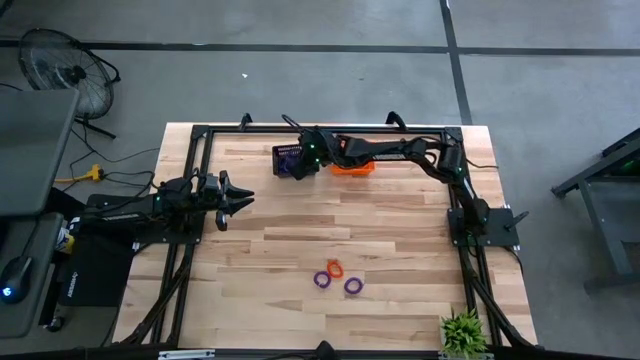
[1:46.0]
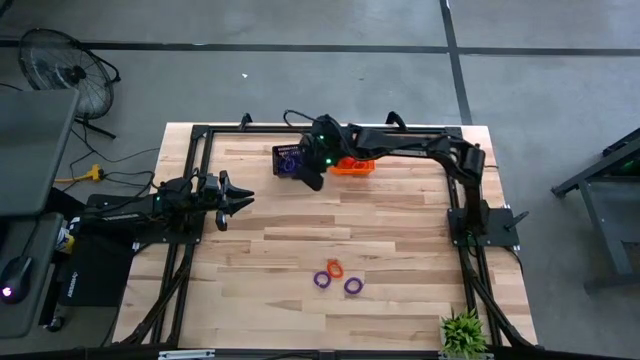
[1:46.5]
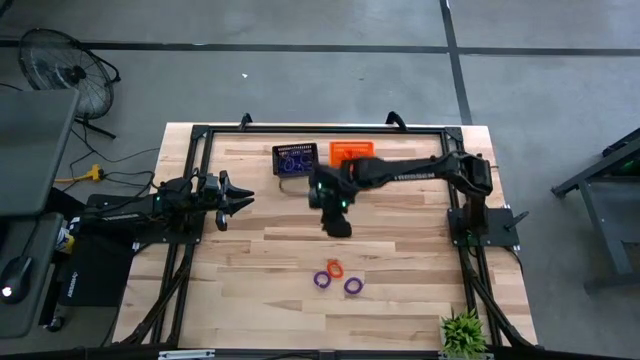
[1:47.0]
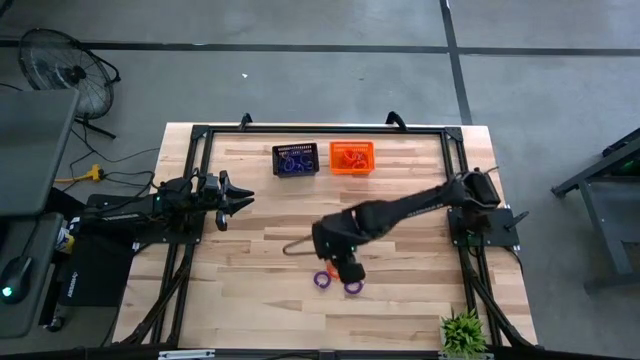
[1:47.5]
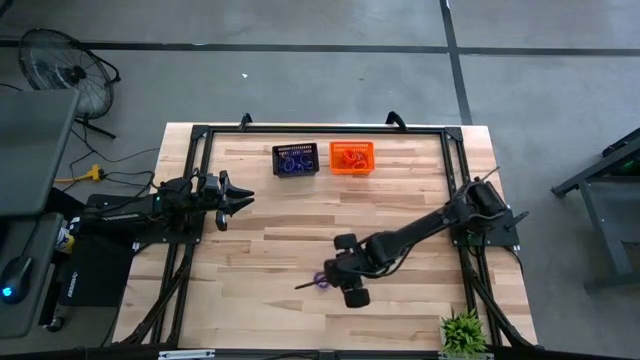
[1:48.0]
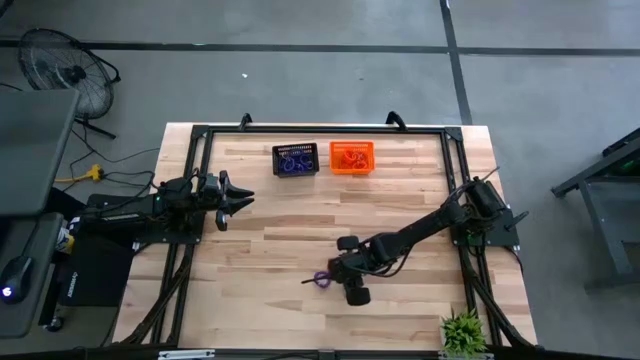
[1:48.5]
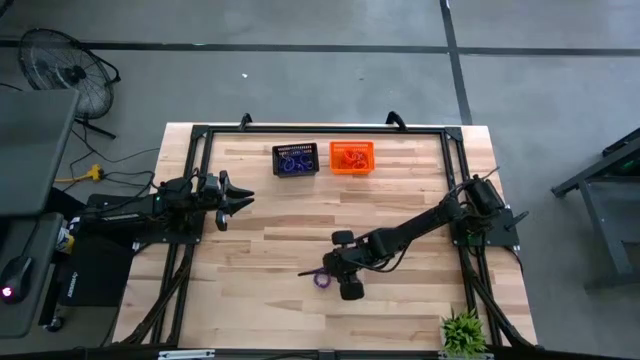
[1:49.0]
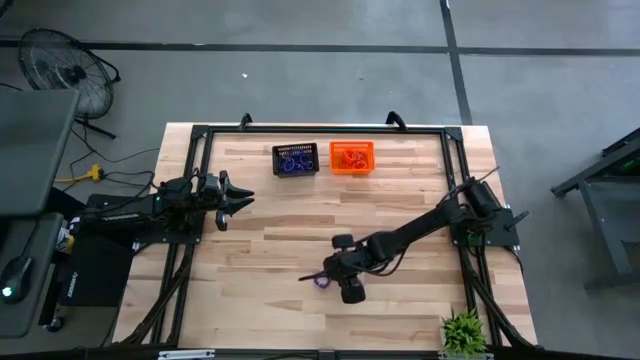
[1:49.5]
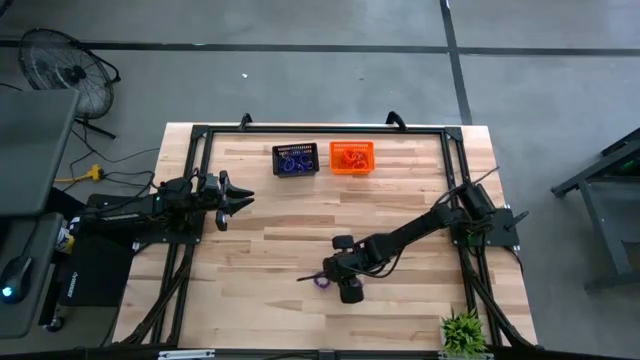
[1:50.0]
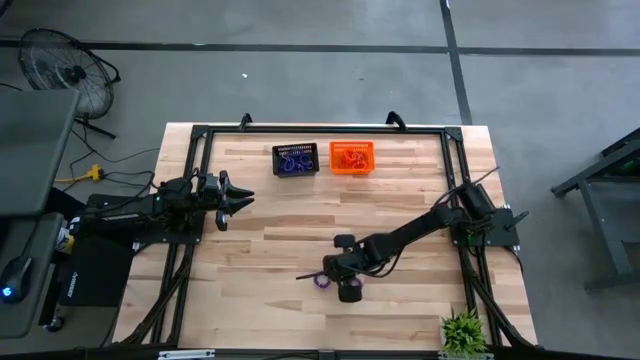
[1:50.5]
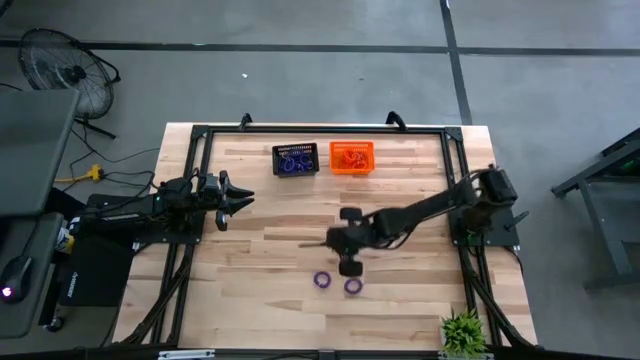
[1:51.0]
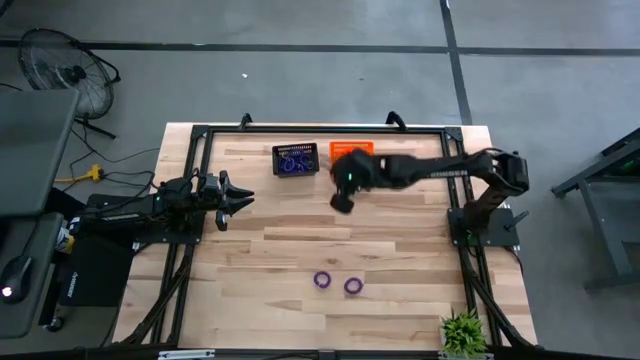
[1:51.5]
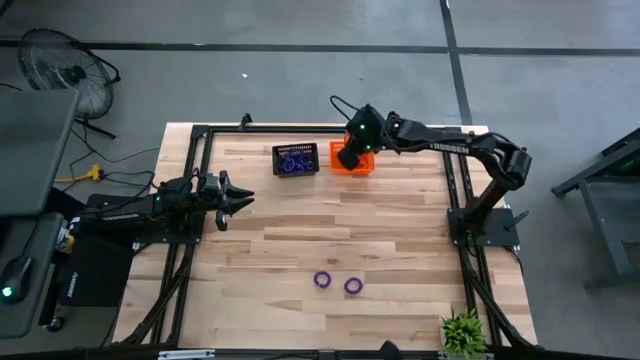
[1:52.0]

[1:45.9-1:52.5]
Task: Sort spring keychains
Put the orange spring keychain into the orange bin

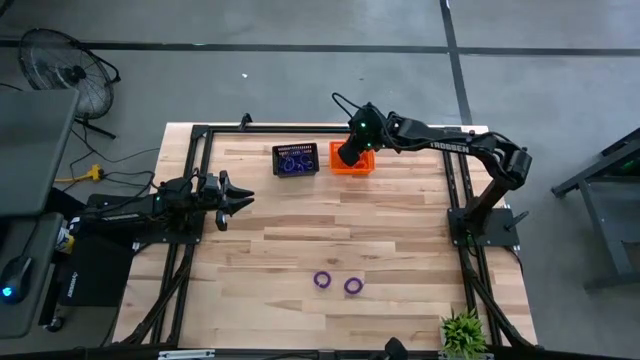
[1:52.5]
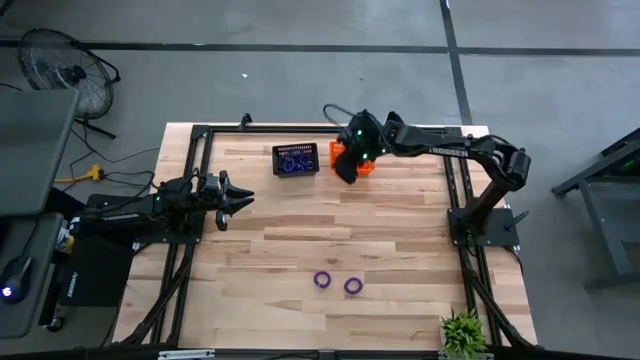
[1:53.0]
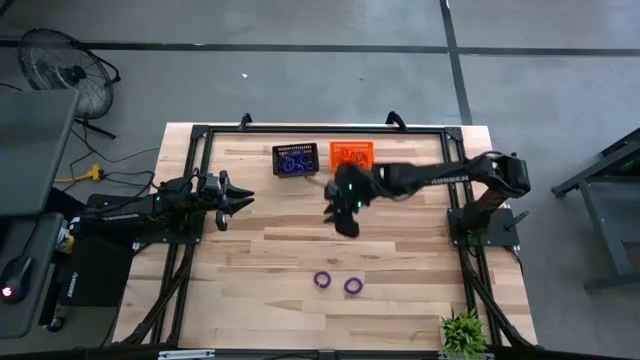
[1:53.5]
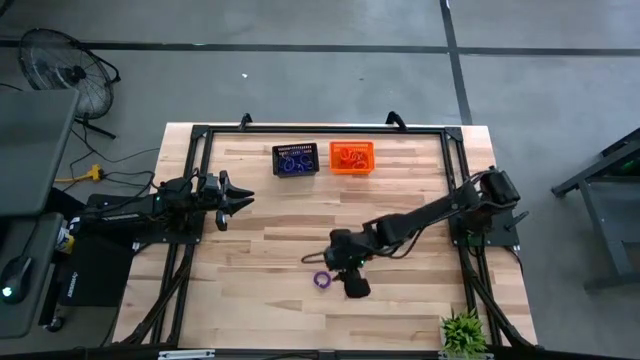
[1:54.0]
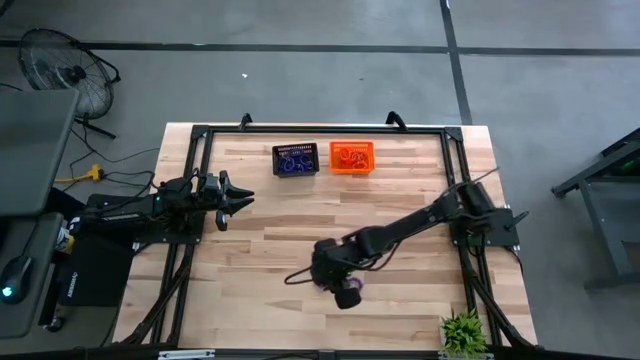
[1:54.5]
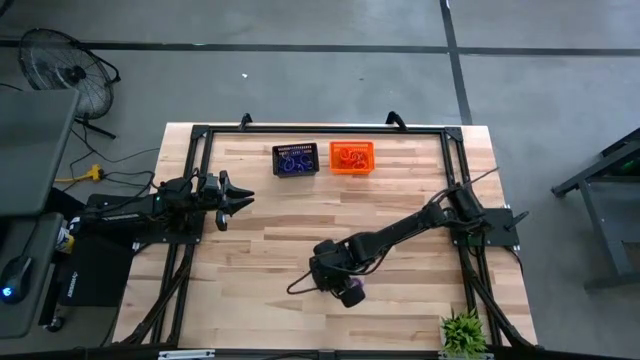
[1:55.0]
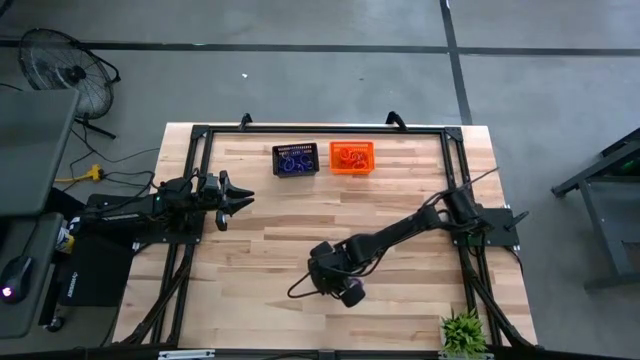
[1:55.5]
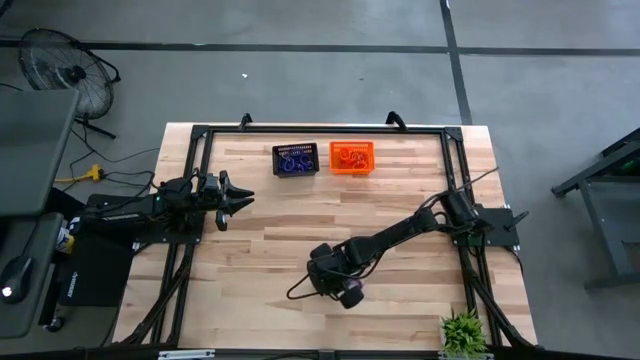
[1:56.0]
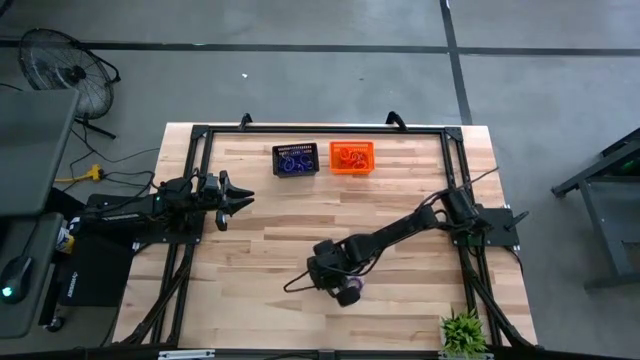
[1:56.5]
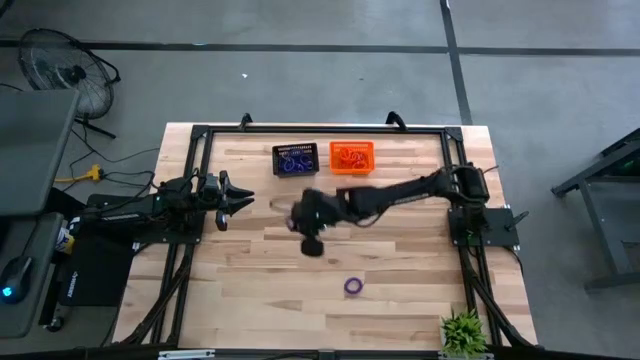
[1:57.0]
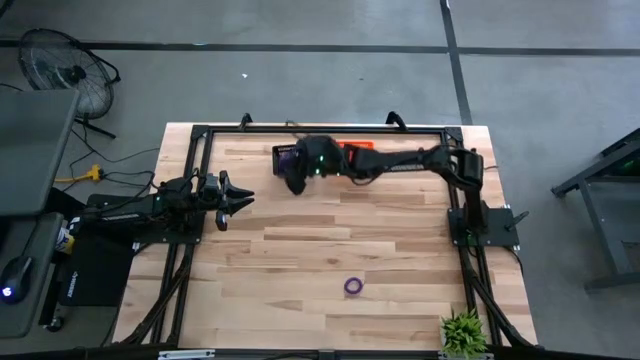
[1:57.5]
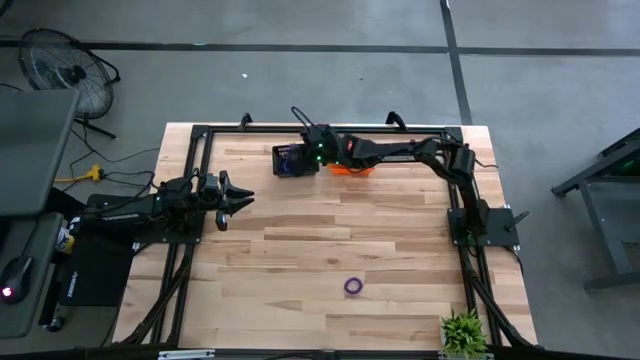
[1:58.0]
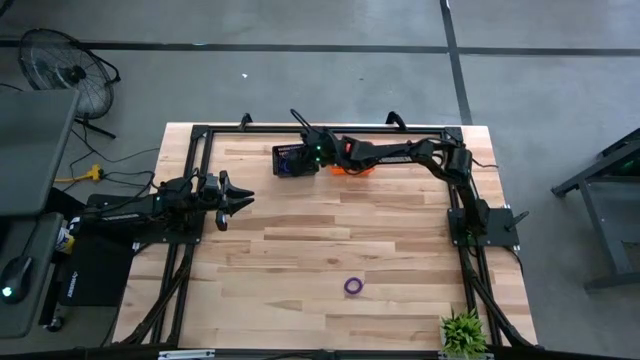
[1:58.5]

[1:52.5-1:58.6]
Put the left purple spring keychain into the black bin

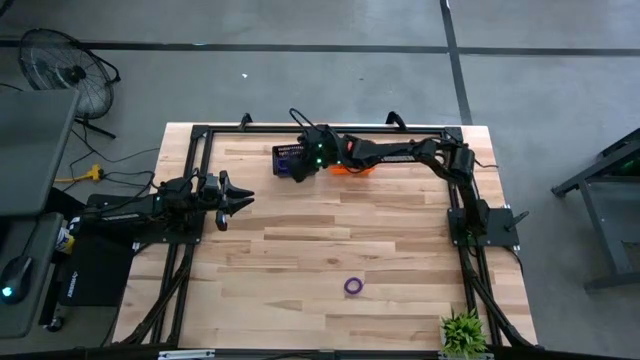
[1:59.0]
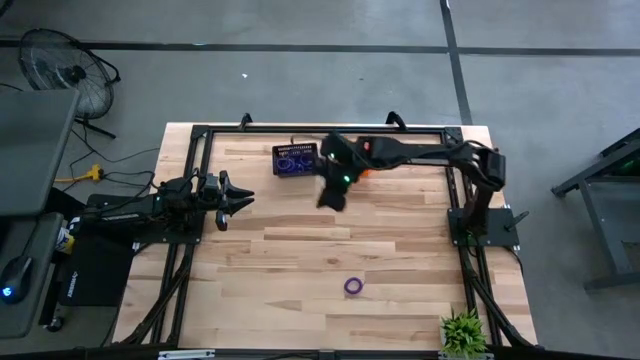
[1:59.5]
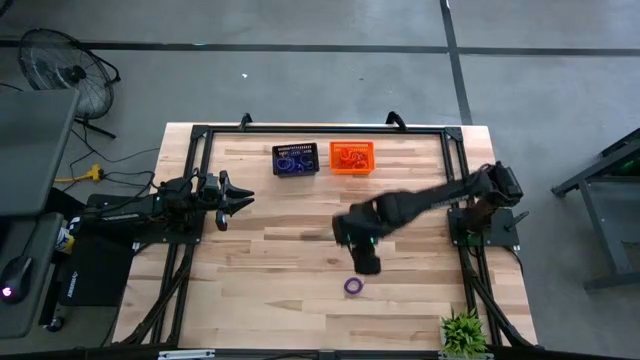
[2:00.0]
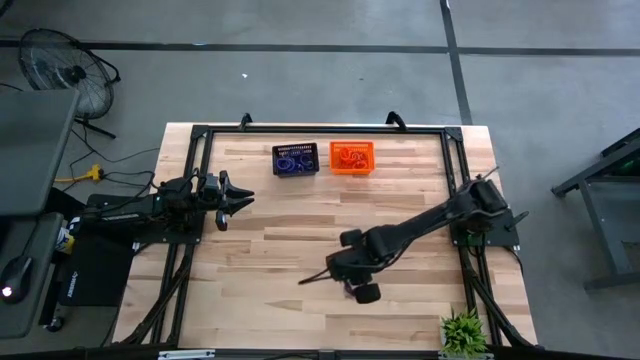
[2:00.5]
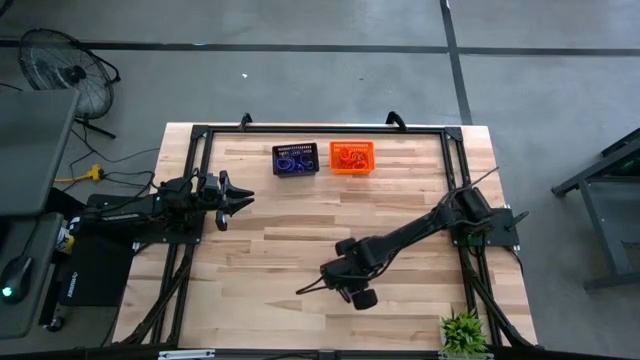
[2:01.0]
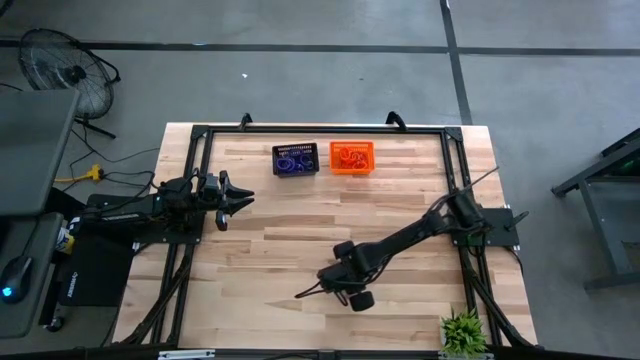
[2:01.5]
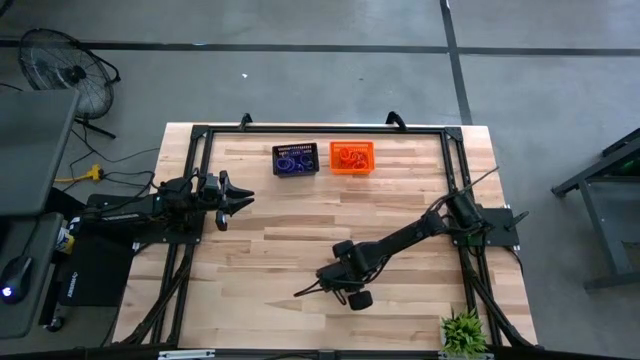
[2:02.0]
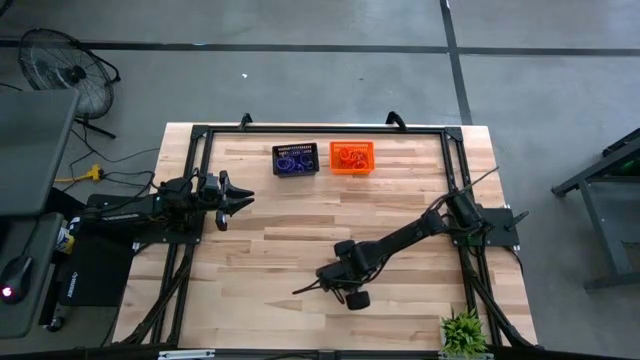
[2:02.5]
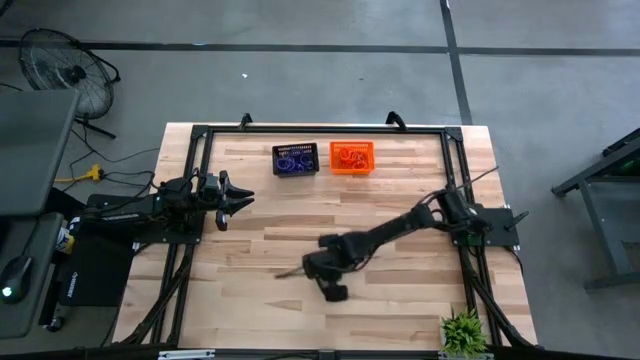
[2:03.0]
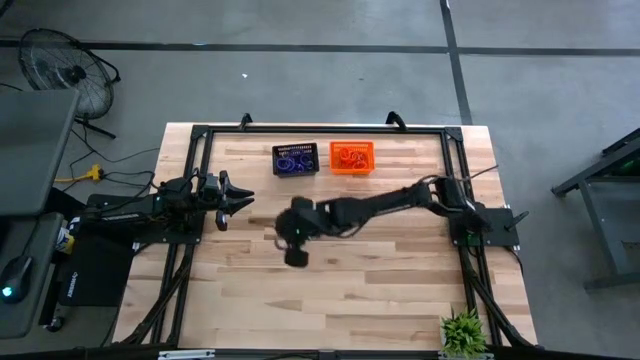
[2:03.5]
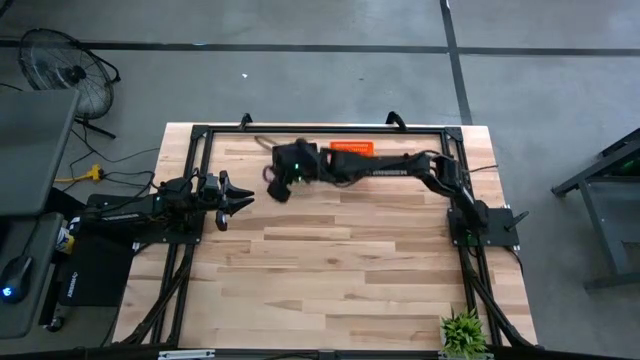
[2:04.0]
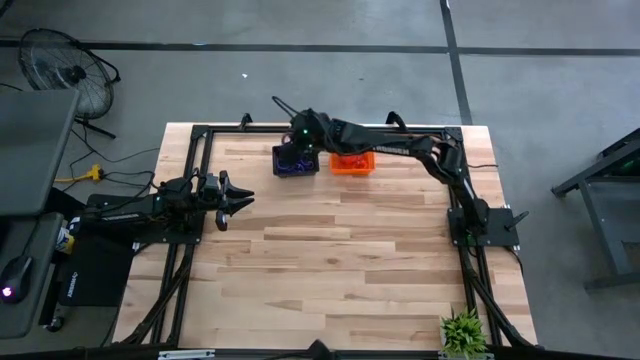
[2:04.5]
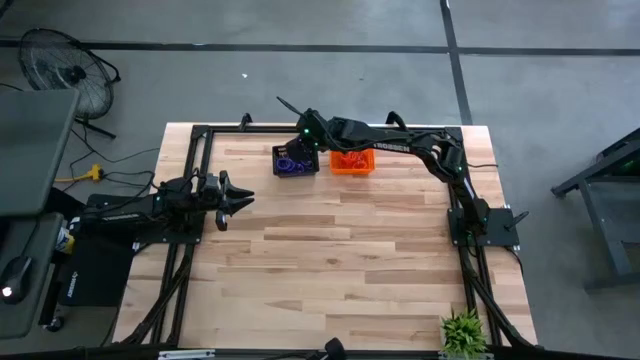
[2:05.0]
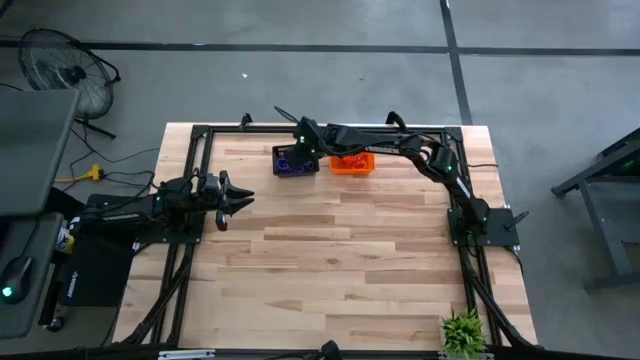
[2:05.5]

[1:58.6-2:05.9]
Put the purple spring keychain into the black bin

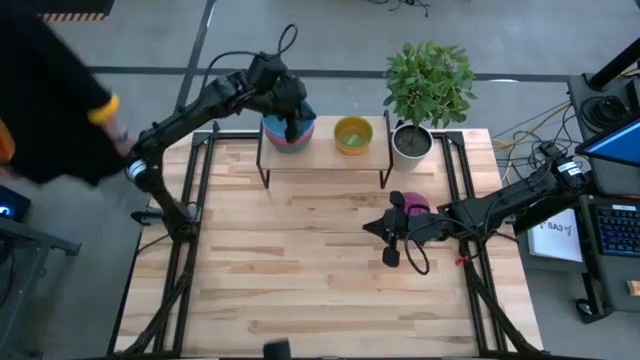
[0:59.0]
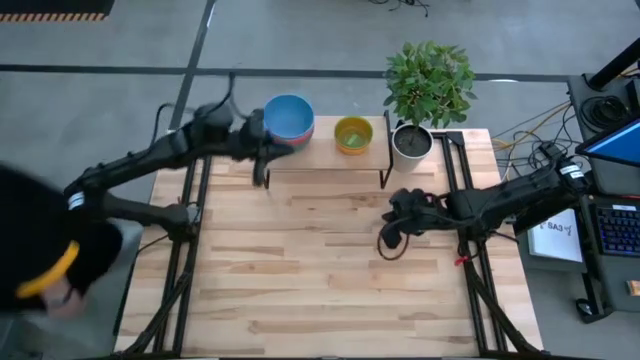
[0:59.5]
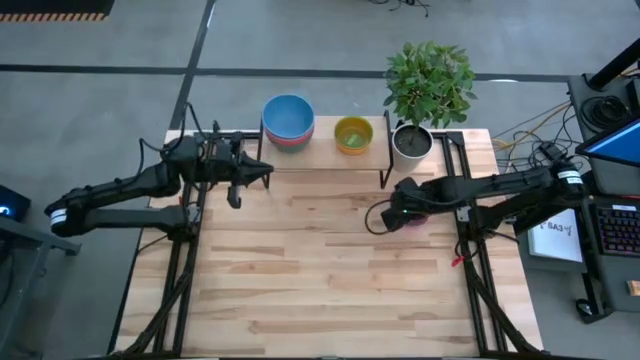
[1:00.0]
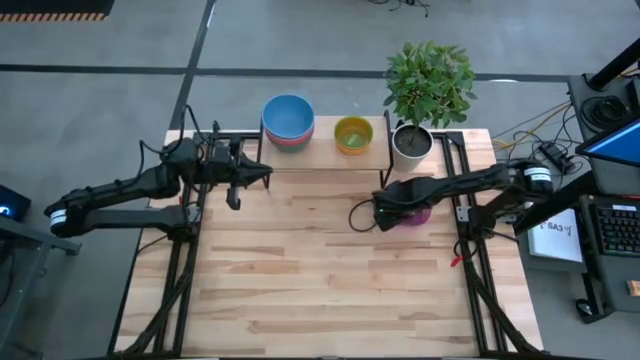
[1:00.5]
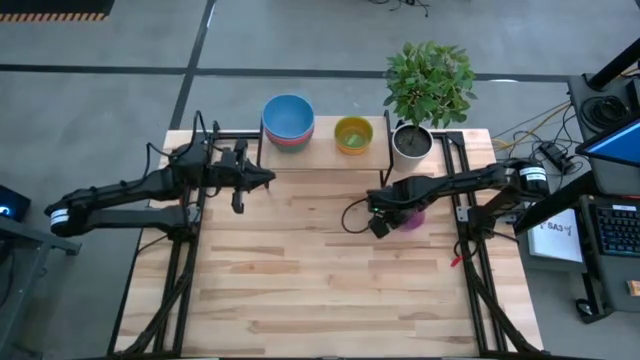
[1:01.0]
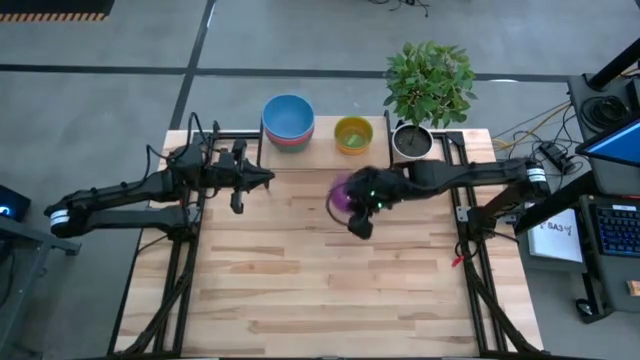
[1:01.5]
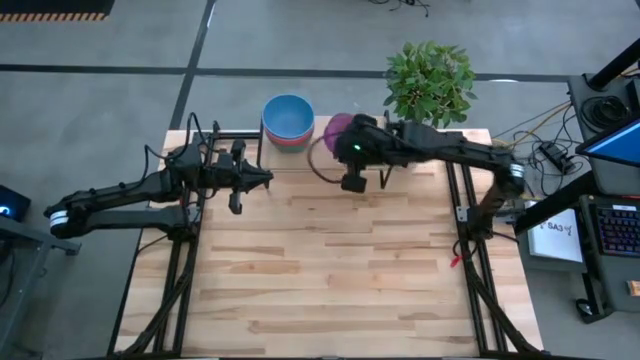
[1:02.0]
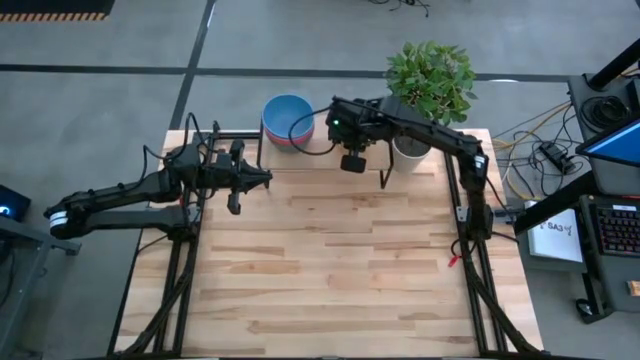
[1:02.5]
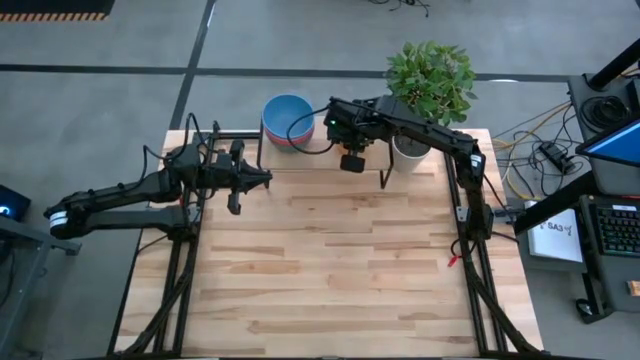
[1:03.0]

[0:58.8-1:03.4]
Task: Place and stack bowls onto a shelf
Stack the purple bowl on the green bowl on the shelf
